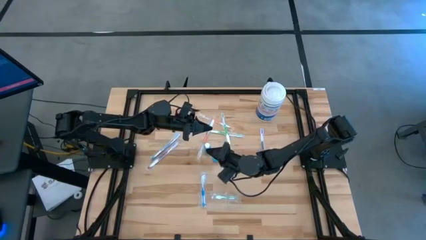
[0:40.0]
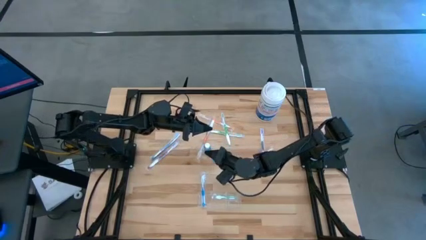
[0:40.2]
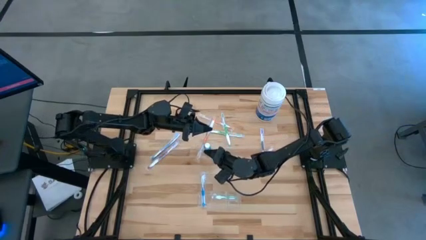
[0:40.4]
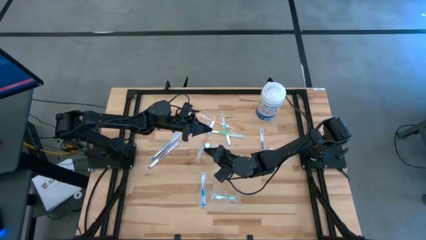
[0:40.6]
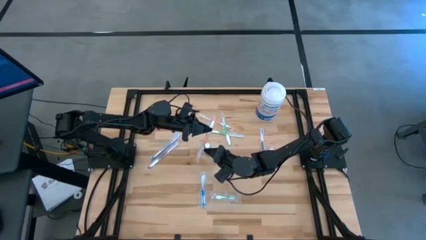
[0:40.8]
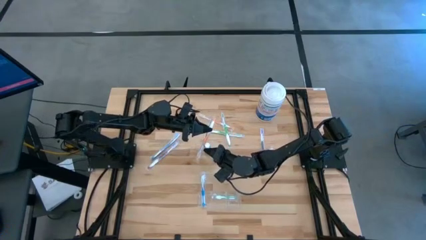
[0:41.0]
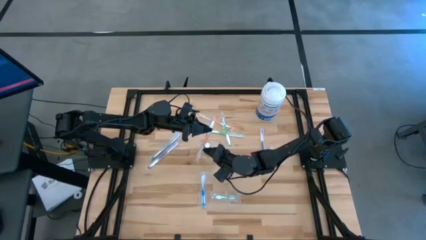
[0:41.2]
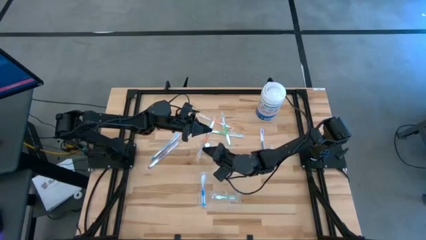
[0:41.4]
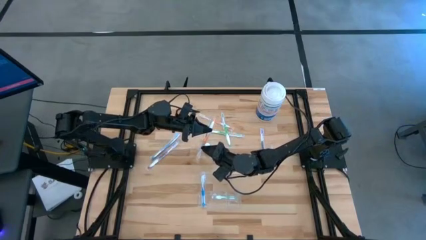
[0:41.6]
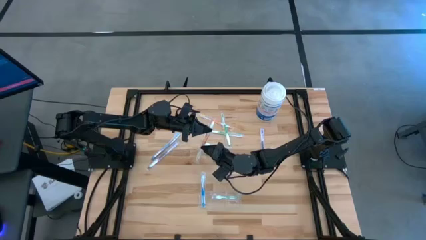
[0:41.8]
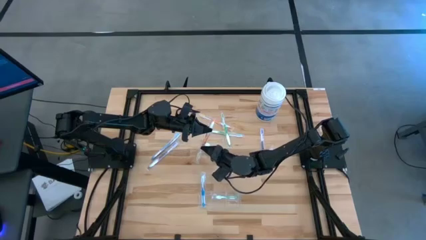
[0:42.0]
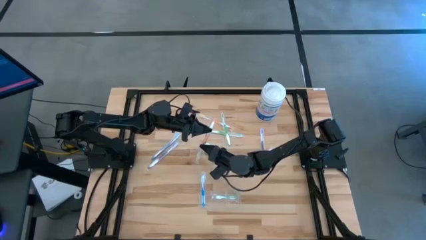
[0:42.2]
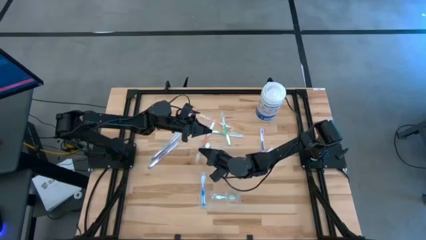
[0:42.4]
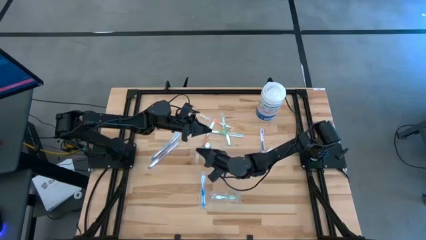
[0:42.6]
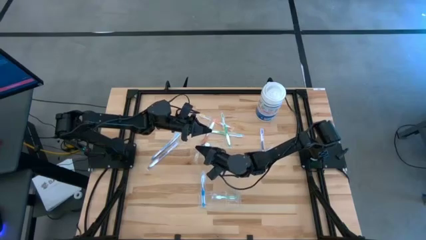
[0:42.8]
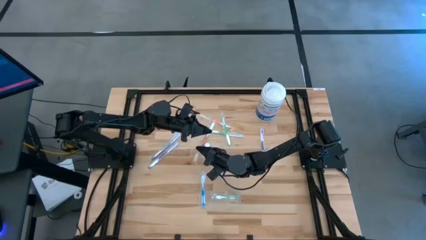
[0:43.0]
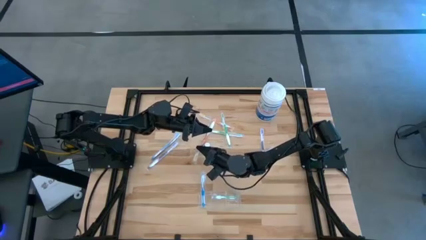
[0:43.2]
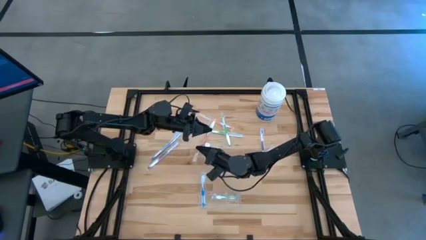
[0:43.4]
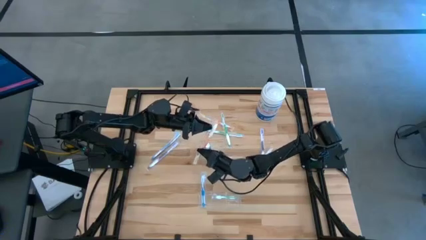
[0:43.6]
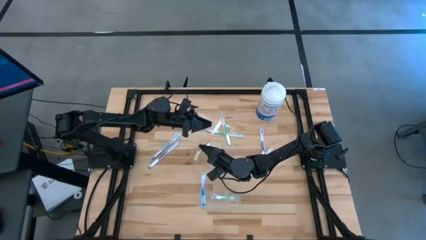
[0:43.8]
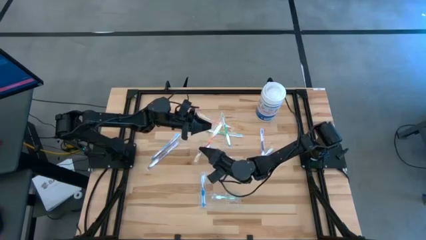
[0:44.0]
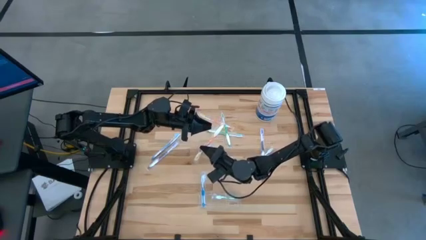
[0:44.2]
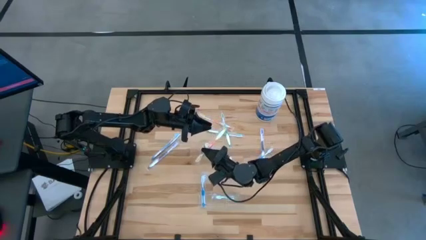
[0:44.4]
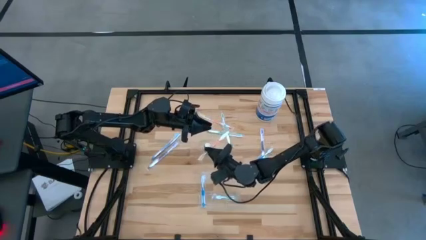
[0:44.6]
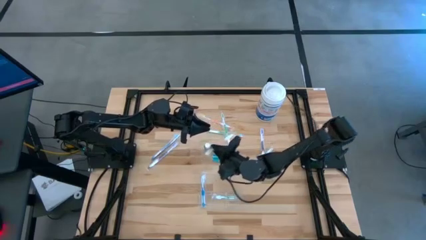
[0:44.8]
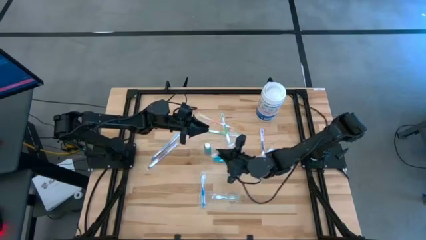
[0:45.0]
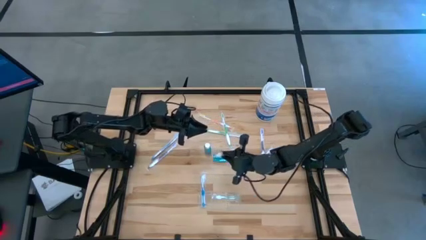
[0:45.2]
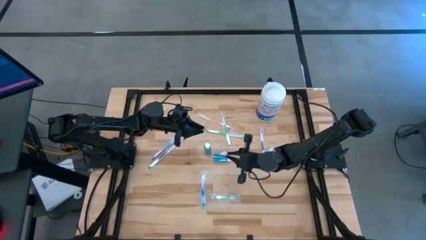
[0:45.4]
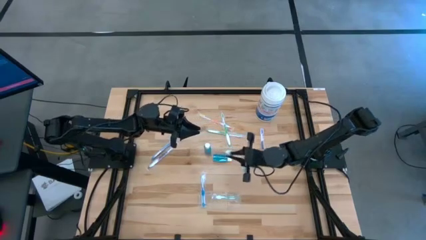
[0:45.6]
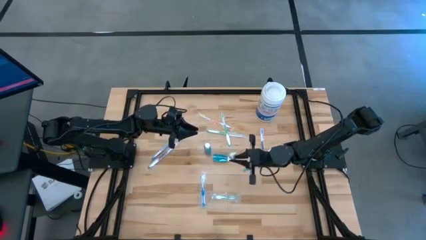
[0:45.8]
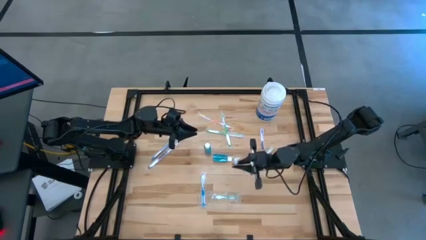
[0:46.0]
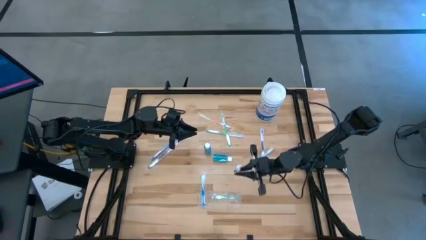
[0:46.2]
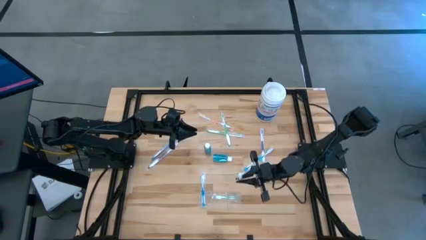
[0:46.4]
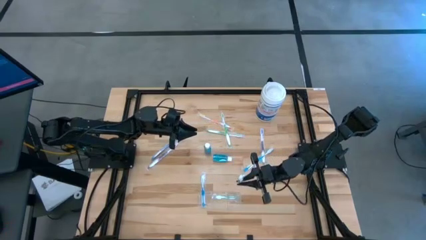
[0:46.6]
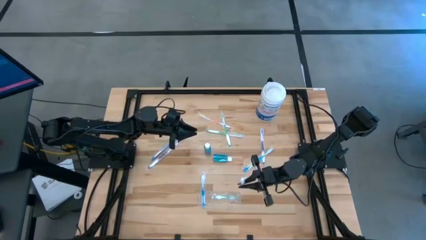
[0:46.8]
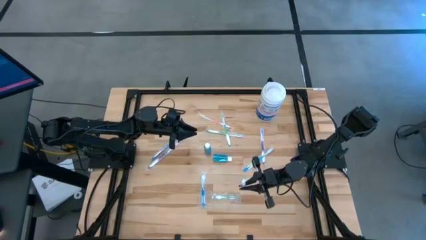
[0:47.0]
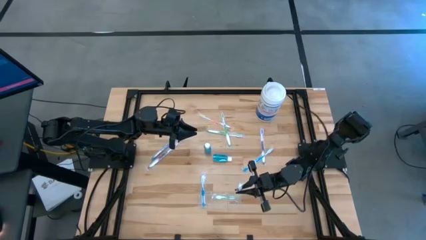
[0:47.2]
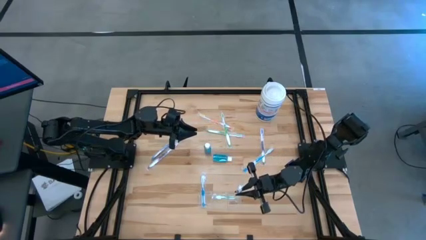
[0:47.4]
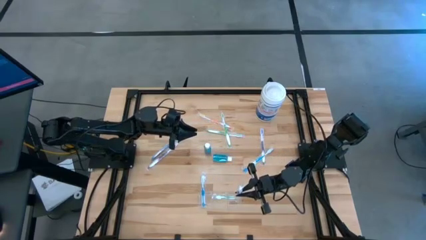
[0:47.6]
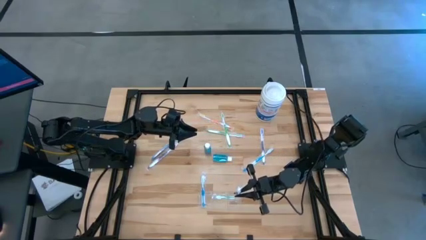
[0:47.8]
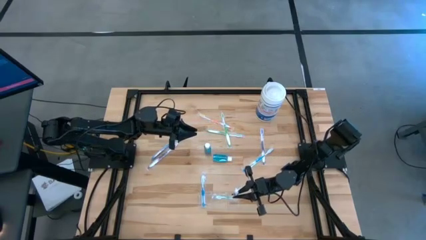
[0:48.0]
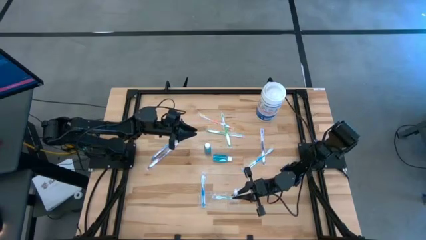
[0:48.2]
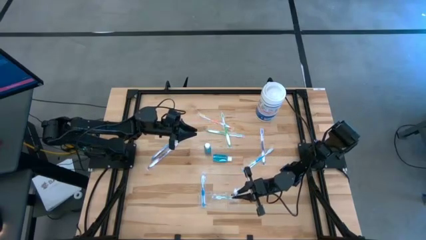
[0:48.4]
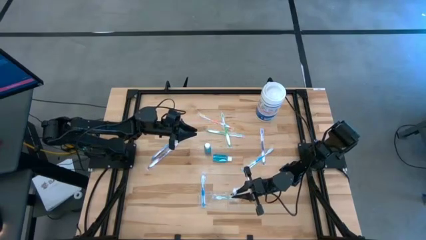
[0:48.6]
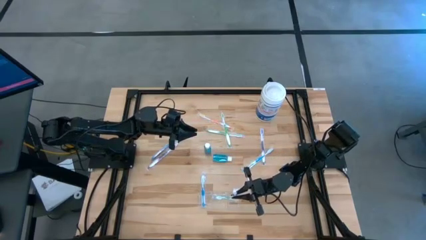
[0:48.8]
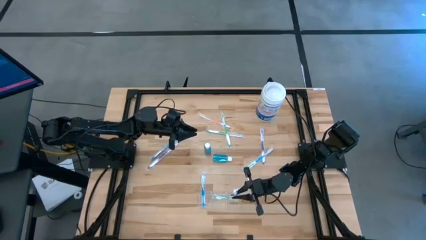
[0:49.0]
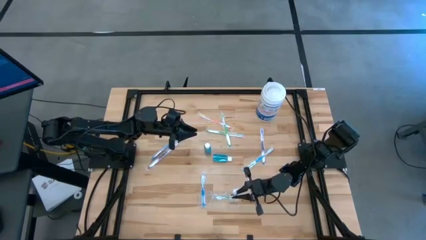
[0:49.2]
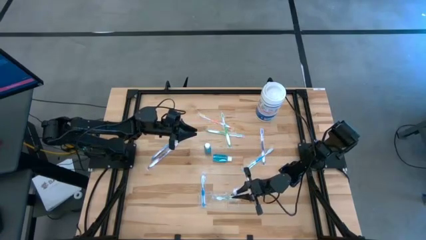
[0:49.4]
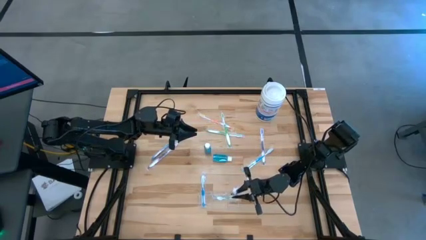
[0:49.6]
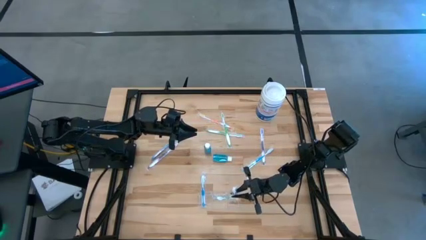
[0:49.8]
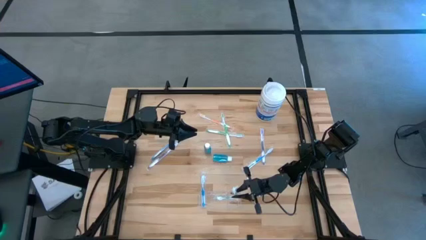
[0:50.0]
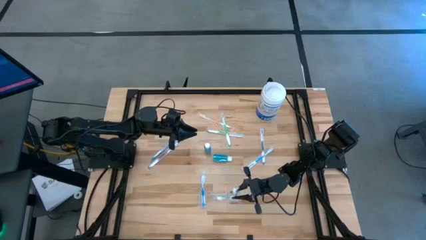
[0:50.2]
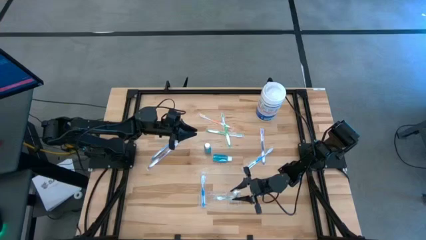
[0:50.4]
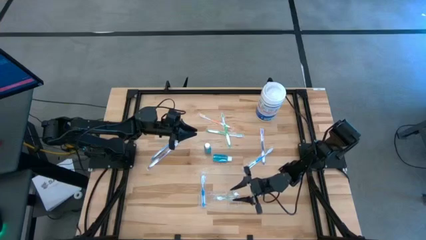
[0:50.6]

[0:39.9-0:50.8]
Task: Pick & Place toothbrushing station
Put the orange toothbrush into the transparent organizer

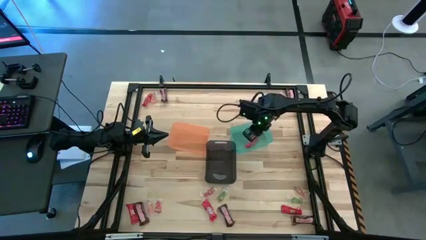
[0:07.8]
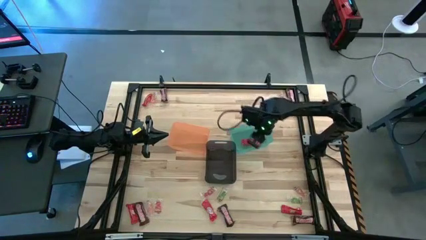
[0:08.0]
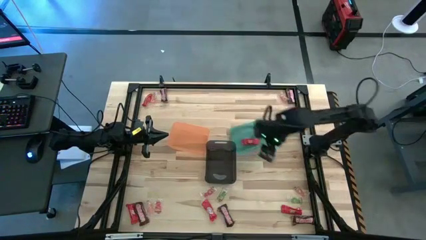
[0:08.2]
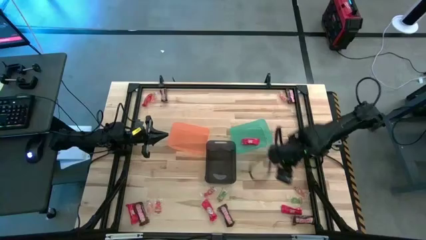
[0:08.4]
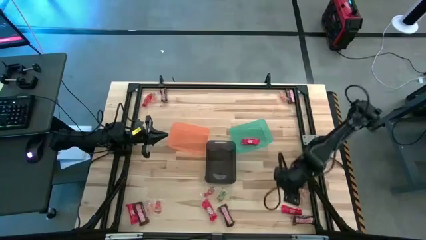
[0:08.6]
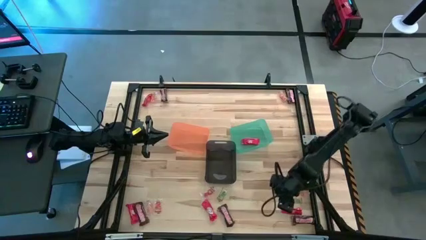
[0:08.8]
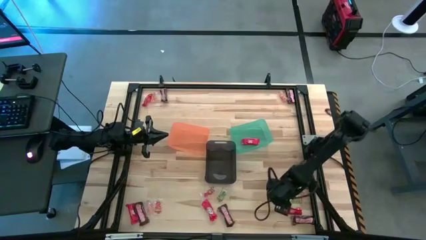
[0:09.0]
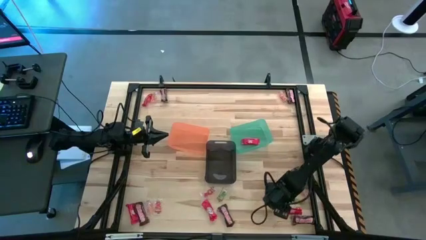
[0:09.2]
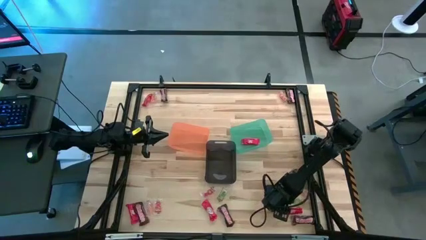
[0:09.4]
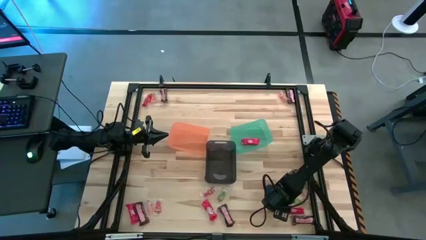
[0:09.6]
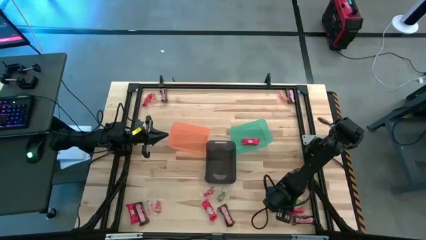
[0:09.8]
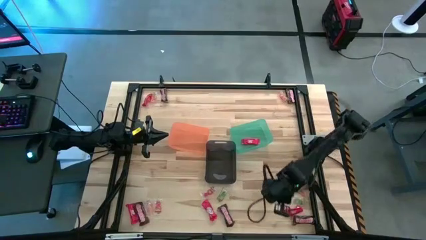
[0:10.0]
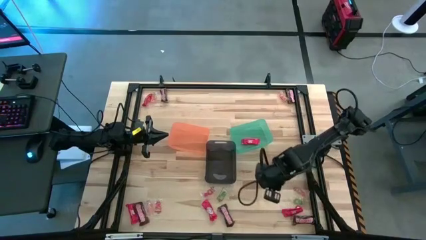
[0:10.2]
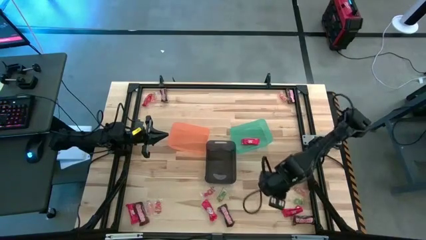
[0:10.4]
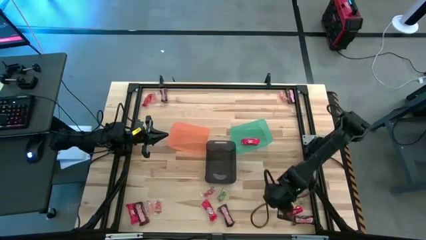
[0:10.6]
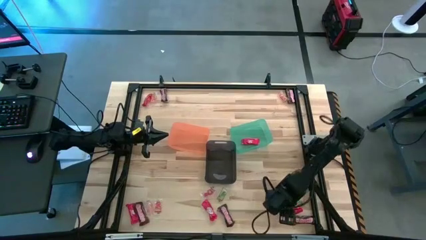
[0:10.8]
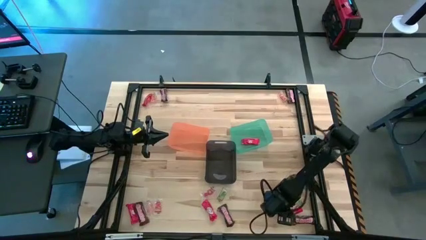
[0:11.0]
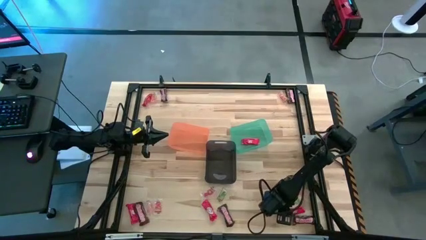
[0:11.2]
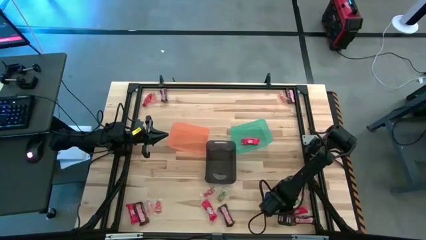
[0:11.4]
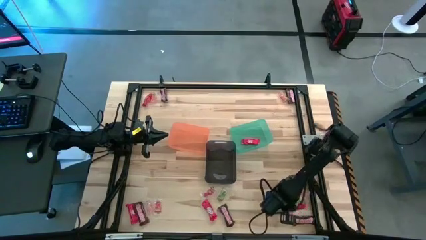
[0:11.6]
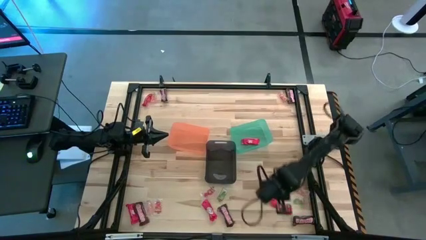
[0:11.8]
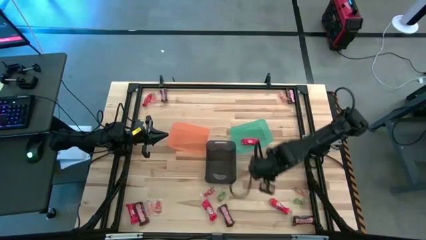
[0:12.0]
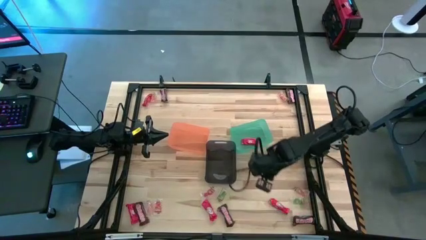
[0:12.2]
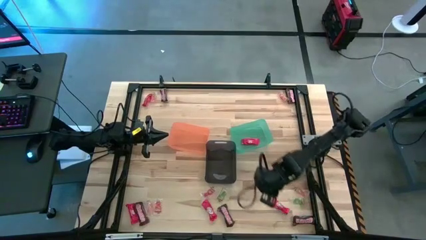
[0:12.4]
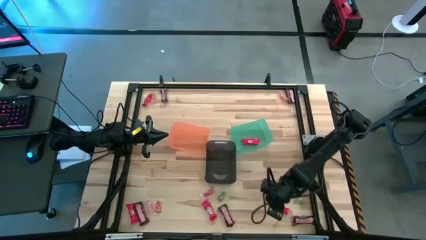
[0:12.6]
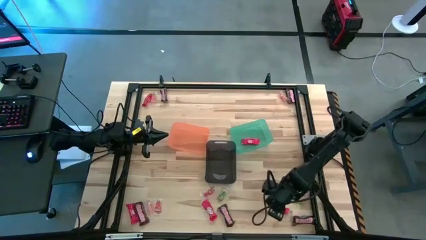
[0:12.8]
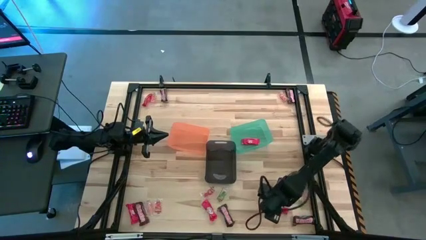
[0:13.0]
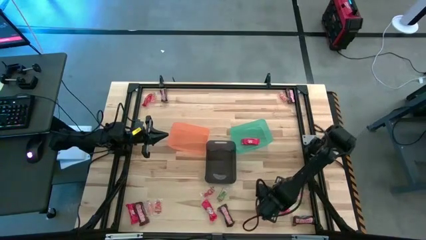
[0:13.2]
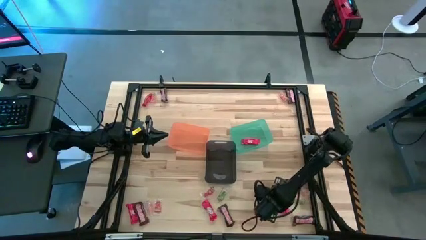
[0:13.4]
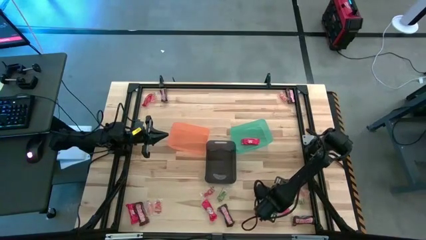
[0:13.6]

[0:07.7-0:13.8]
Task: Sort candy by brand, put in halloween buckets
Put the red chocolate bar into the green bin
